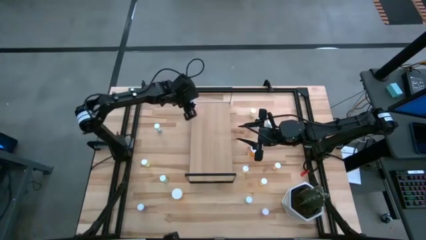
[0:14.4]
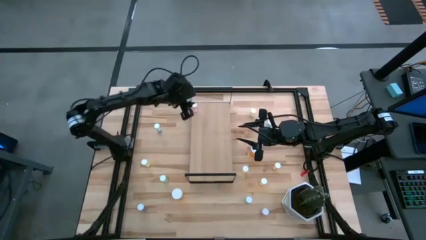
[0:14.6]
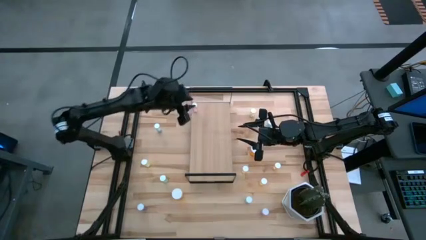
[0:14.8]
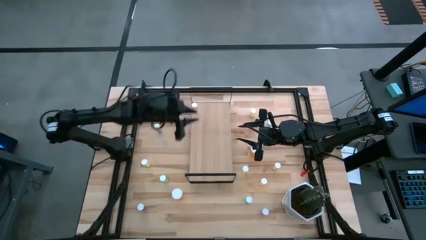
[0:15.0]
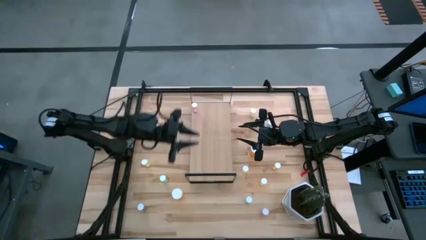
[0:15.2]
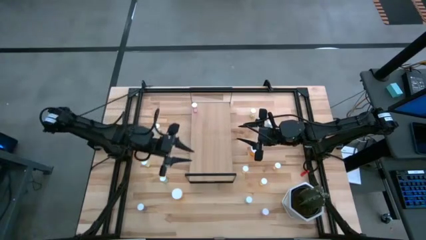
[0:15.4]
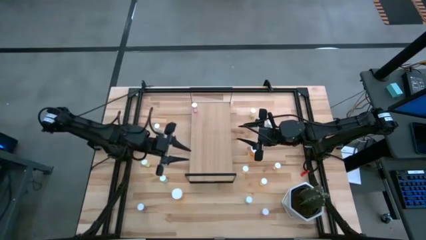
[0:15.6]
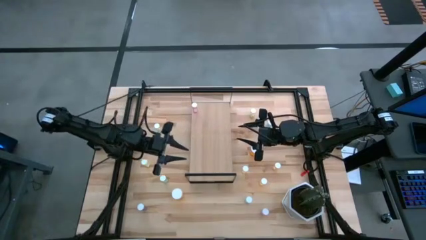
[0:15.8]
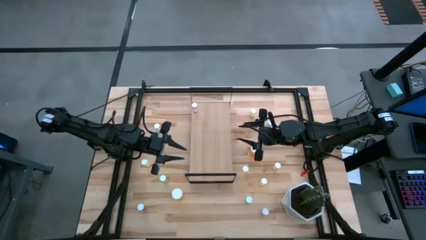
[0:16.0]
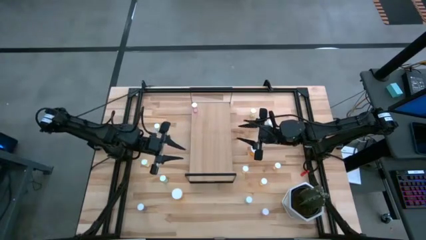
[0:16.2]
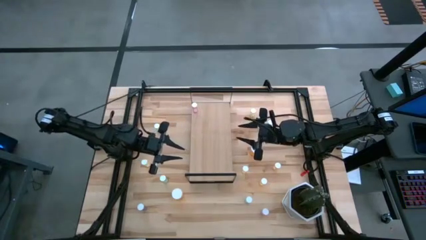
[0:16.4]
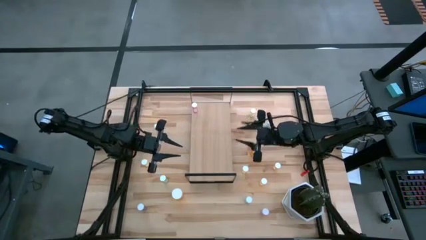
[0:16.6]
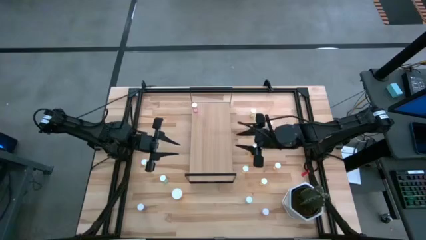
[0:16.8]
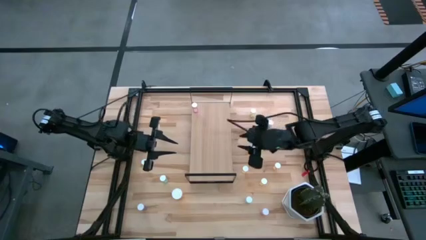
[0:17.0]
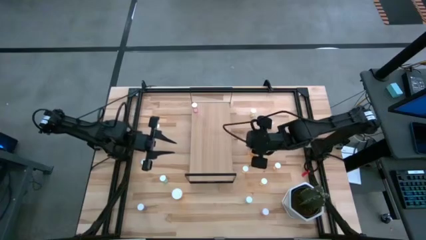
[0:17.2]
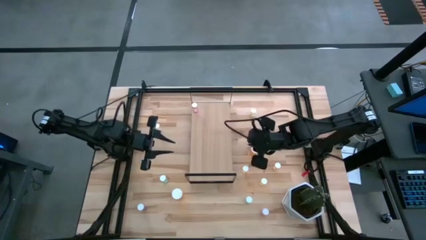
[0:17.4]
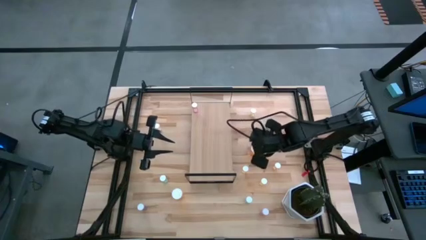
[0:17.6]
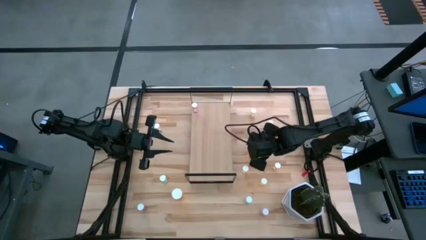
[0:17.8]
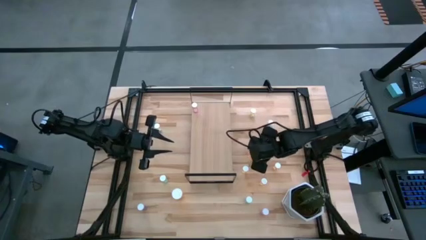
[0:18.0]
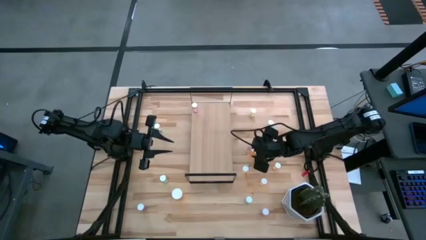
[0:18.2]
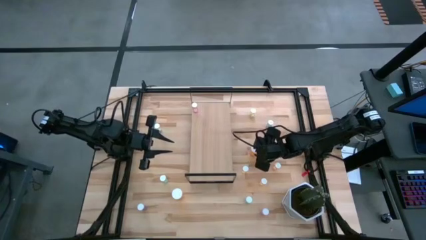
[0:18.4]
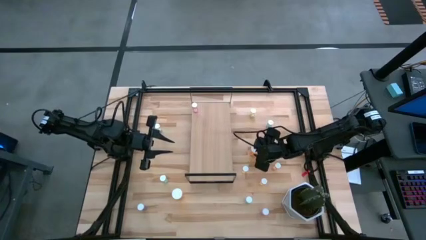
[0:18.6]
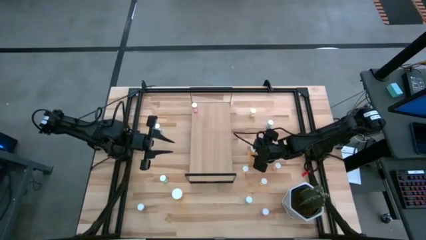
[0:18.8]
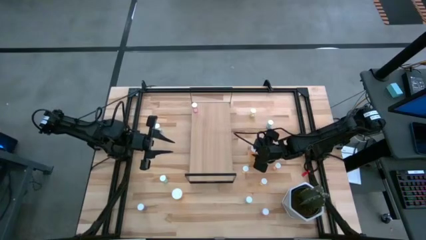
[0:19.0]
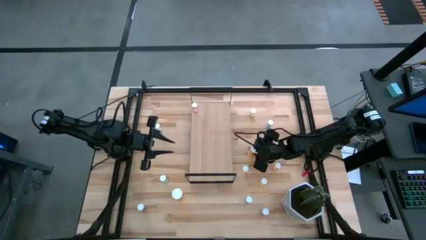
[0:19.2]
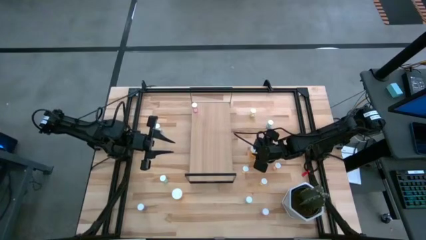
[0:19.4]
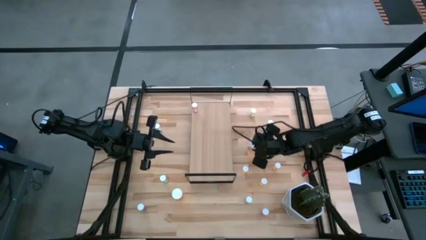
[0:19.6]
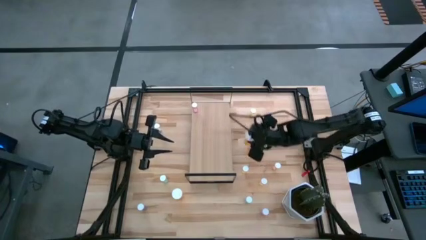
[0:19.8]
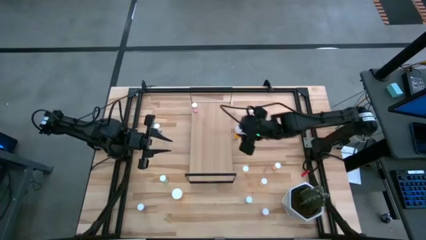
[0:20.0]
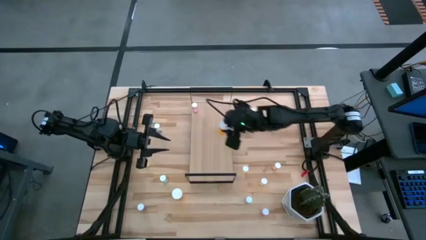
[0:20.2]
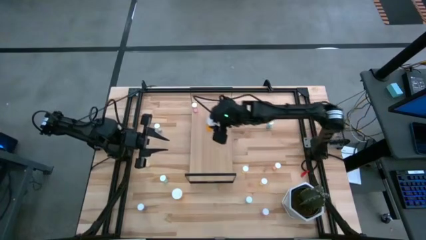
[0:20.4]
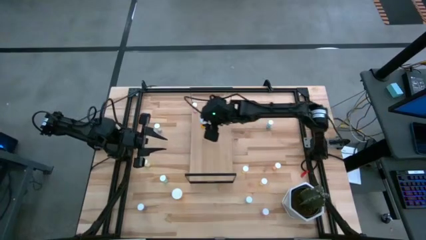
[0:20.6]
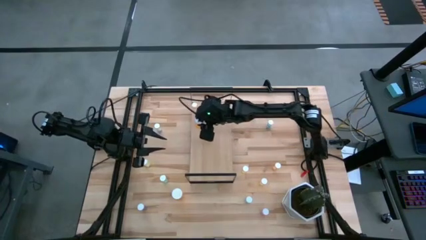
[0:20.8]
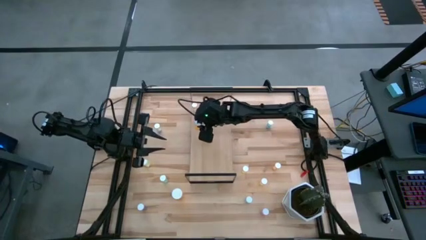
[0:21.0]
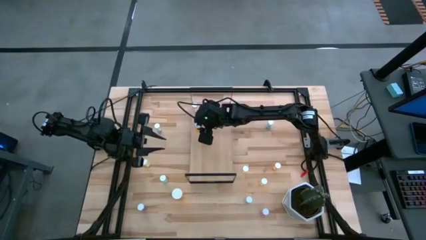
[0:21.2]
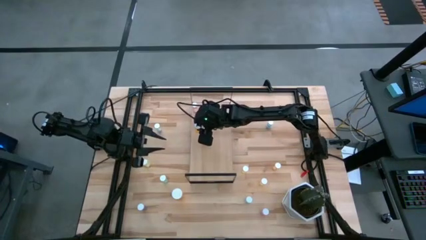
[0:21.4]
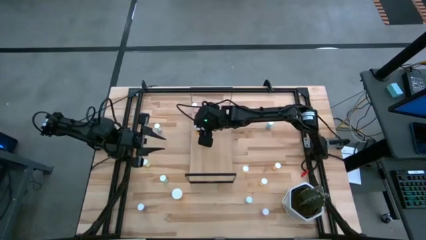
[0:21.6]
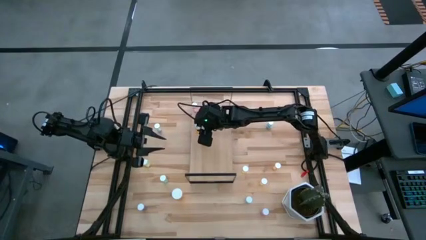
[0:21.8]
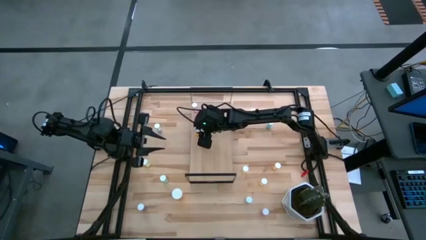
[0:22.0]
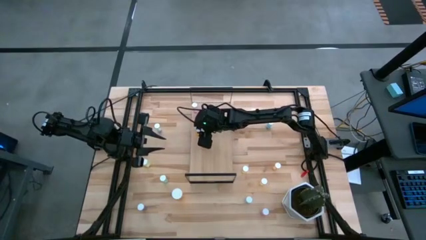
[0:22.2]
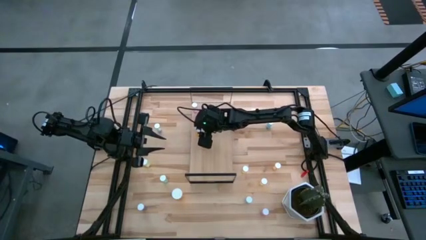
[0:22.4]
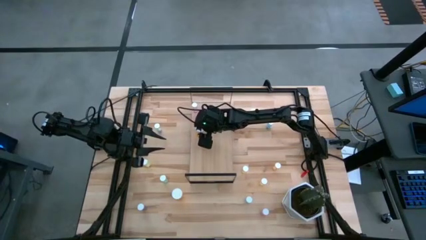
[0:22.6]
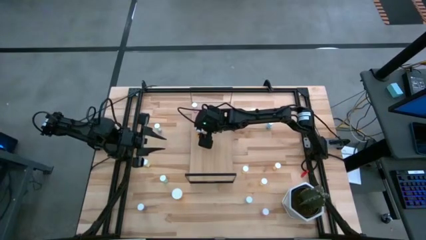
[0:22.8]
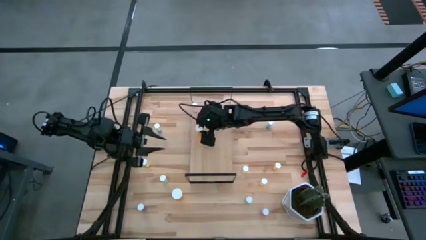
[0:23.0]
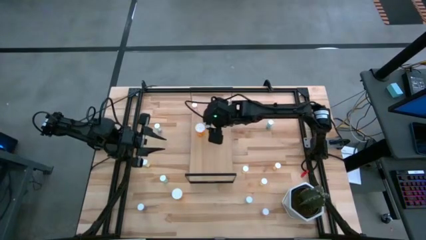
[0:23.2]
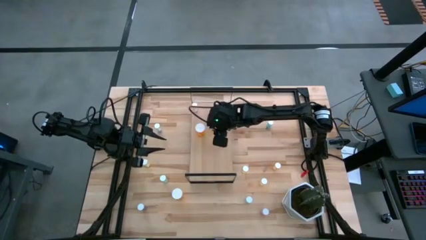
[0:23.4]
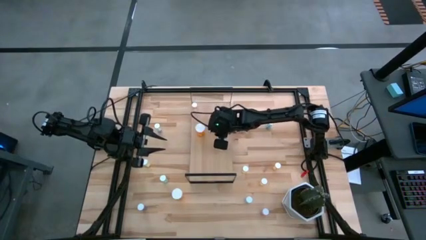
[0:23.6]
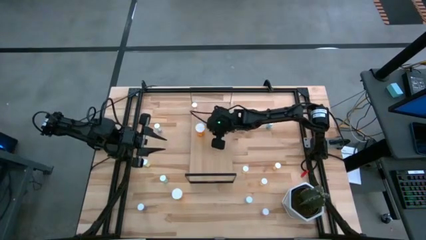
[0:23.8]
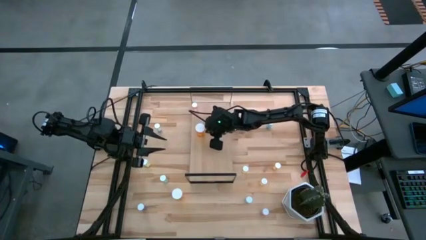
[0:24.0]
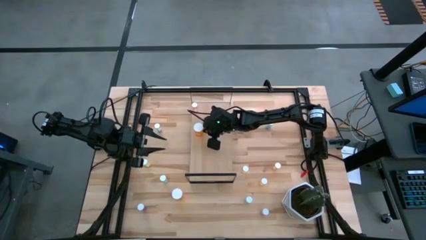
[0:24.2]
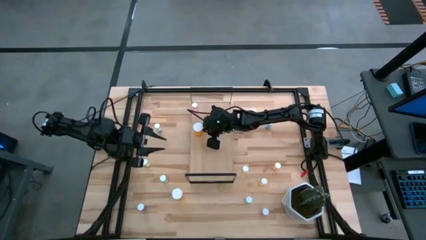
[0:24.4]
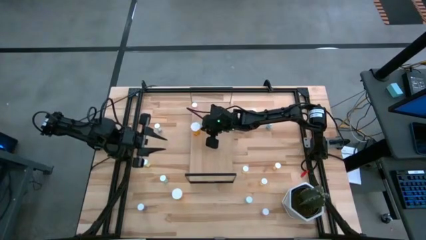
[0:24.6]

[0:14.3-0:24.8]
Task: Pick and place medicine bottles onto shelf by color
Put the big orange pill bottle on the shelf

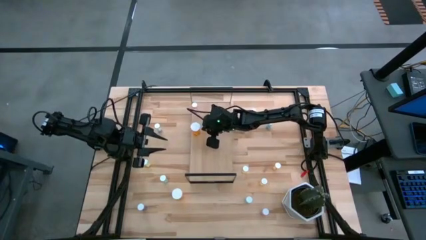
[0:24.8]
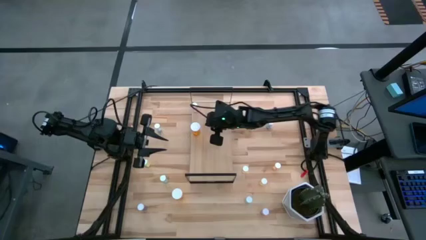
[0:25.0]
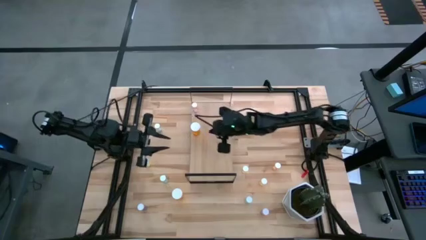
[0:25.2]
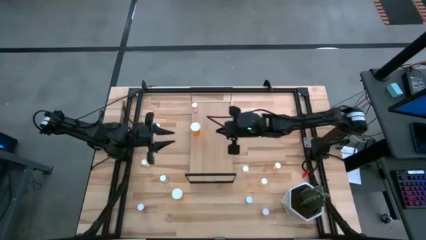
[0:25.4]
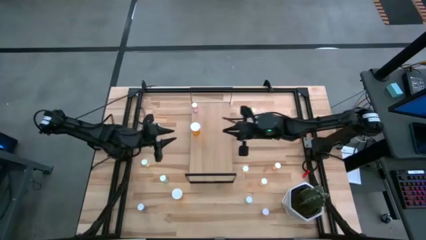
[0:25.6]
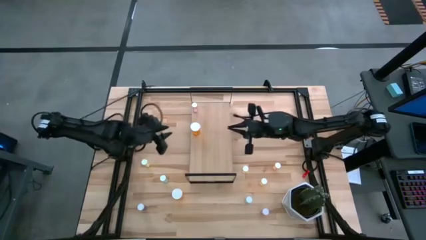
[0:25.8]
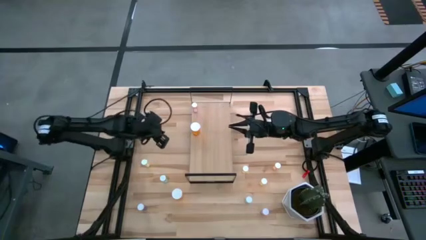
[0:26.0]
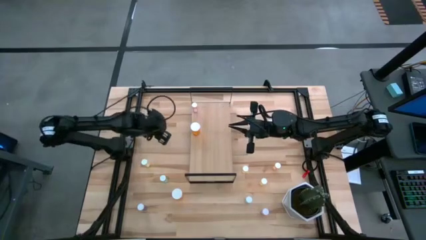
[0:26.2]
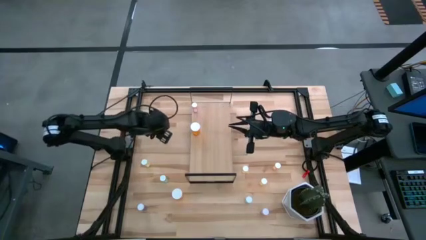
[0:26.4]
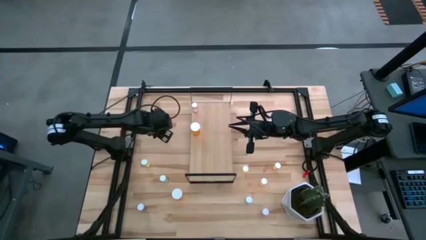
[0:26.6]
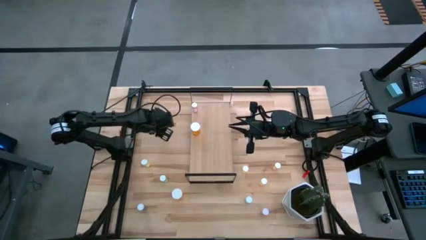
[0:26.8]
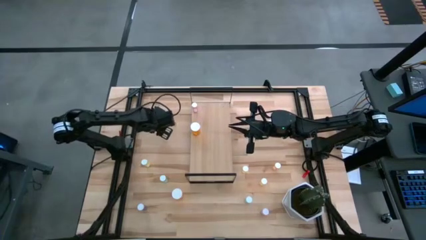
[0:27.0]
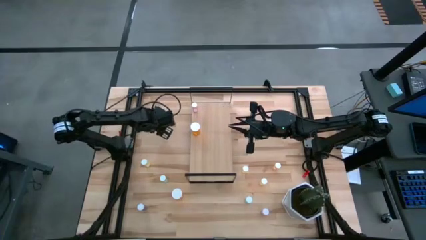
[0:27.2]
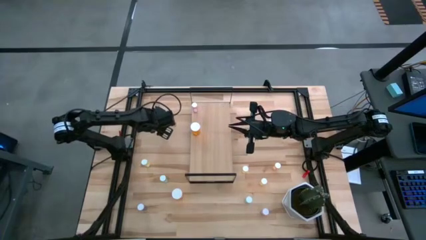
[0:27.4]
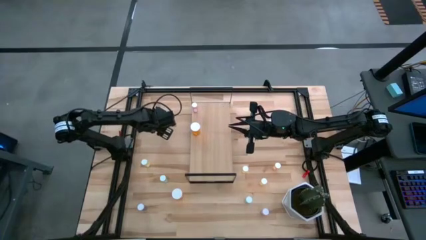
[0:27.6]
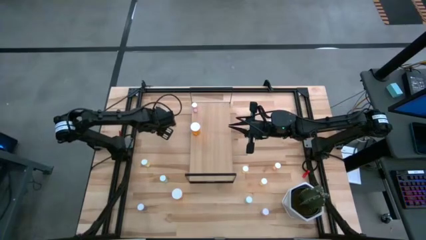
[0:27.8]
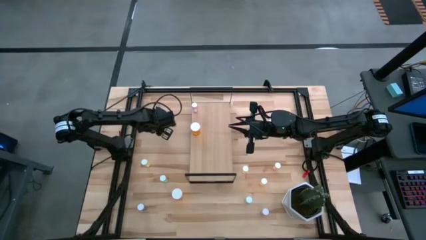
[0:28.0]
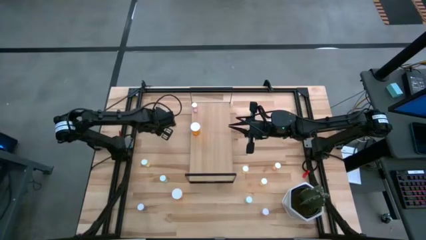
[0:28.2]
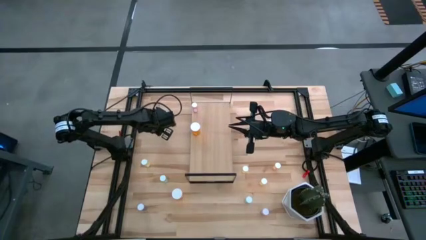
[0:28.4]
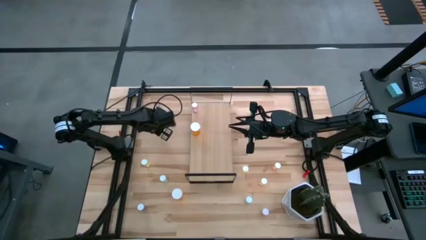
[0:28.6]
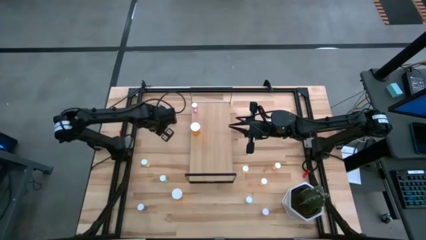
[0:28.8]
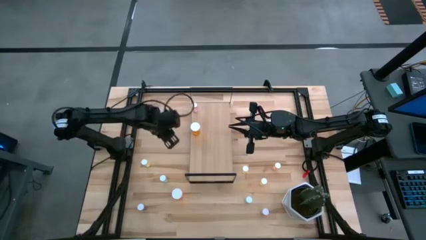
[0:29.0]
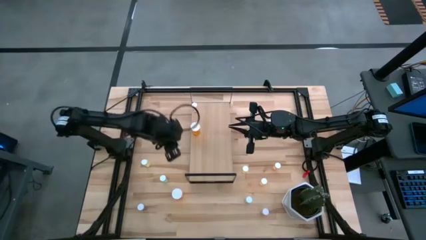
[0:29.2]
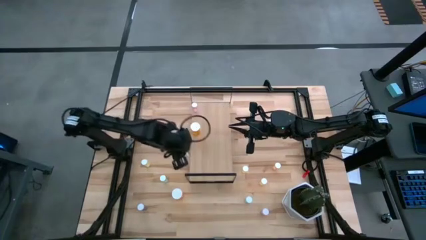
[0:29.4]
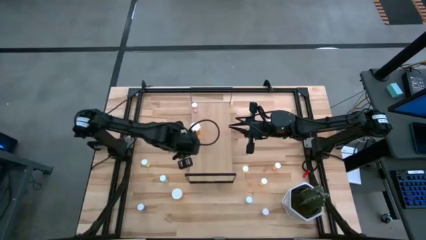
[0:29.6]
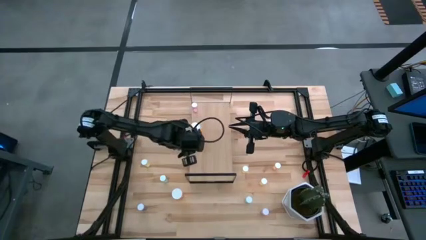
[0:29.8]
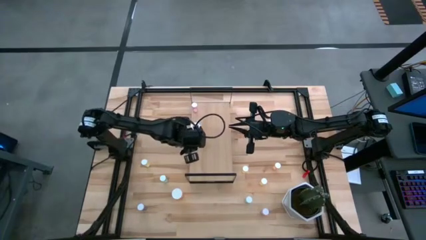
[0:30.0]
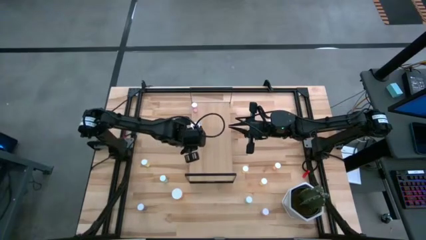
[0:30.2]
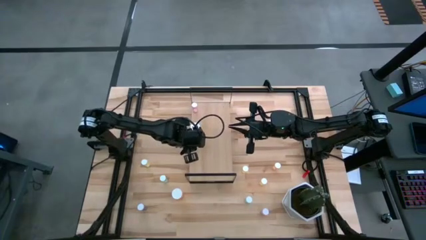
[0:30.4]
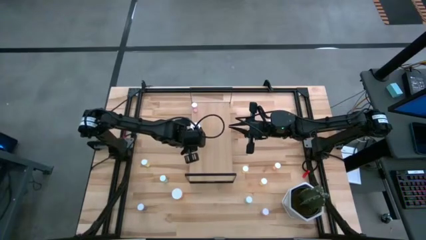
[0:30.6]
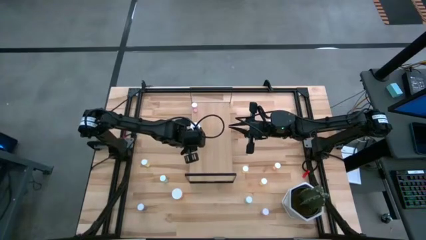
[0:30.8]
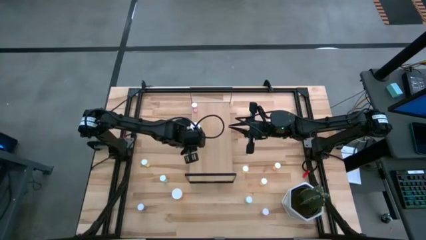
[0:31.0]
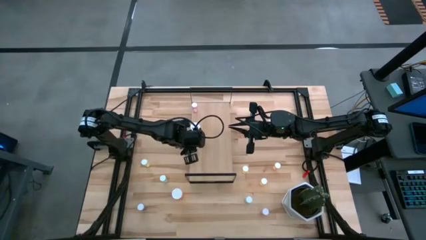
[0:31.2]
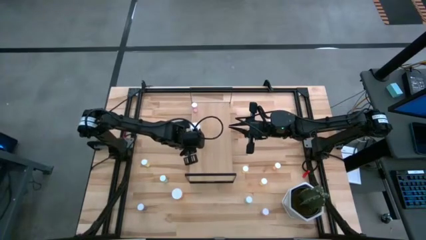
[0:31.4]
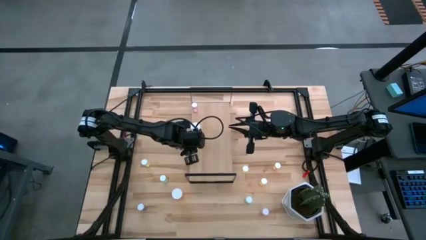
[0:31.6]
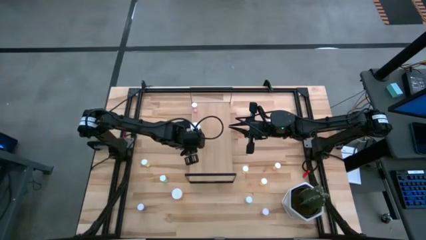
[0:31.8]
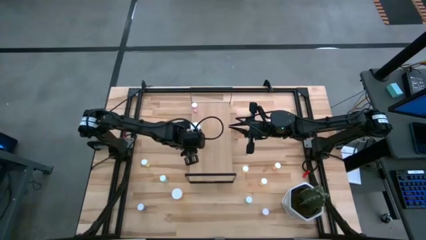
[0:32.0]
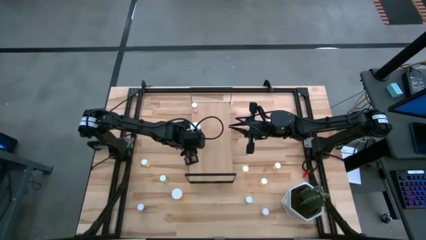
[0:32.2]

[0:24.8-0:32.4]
Put the green pill bottle on the shelf
